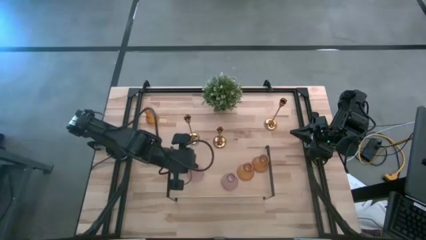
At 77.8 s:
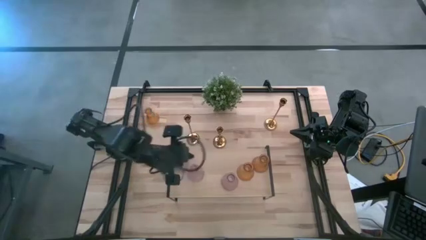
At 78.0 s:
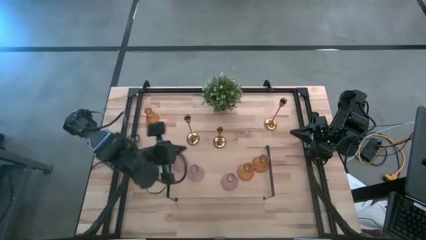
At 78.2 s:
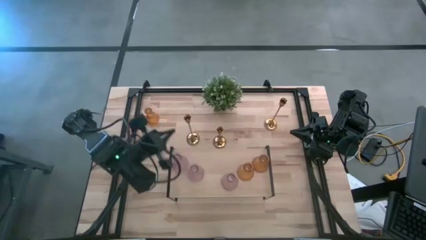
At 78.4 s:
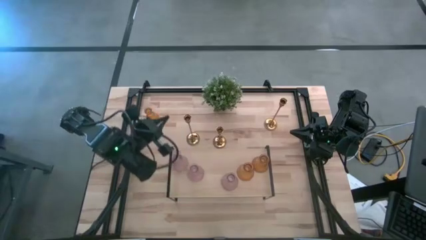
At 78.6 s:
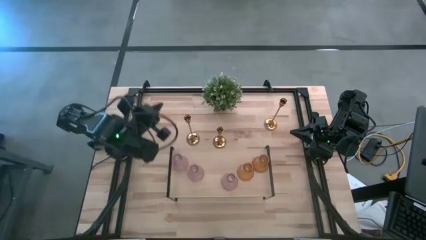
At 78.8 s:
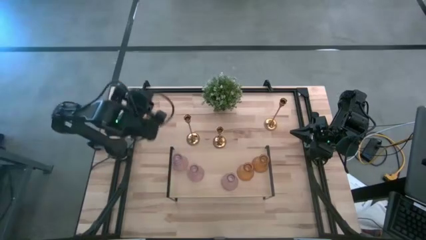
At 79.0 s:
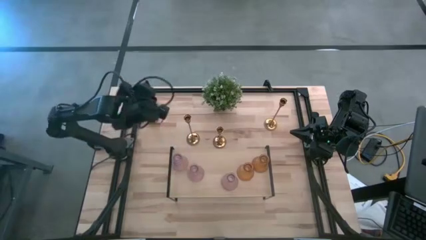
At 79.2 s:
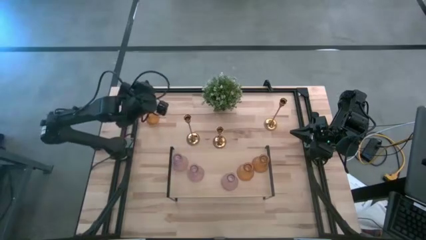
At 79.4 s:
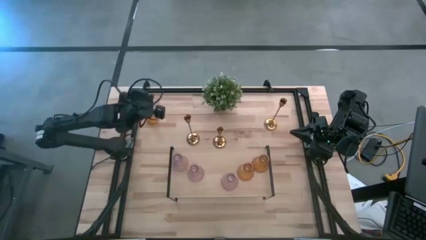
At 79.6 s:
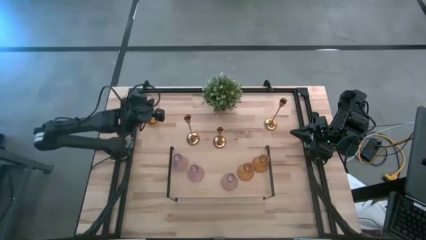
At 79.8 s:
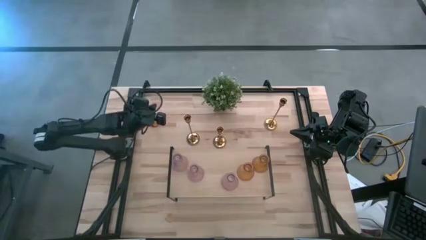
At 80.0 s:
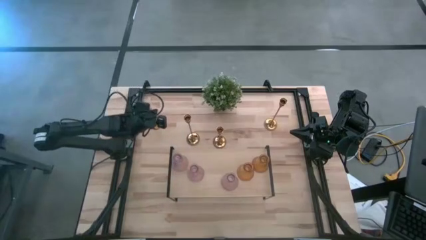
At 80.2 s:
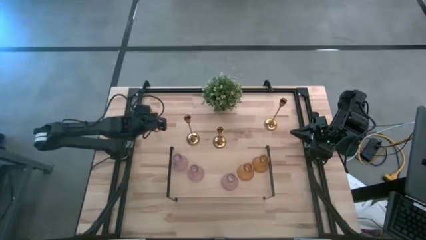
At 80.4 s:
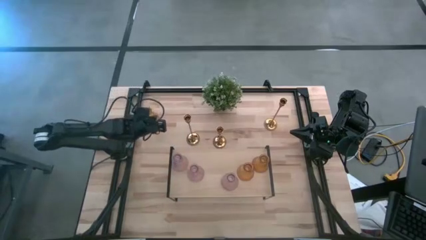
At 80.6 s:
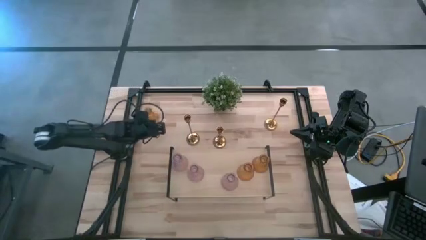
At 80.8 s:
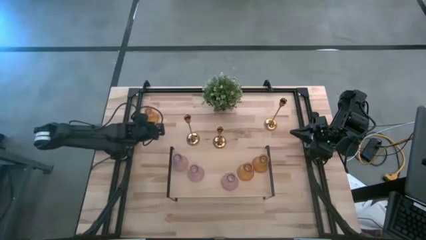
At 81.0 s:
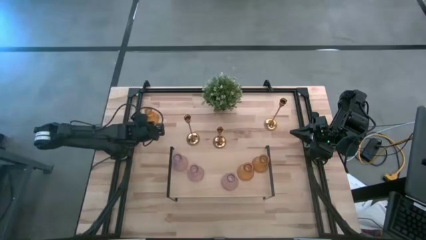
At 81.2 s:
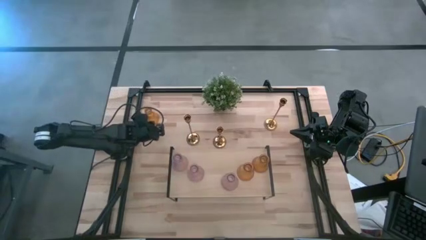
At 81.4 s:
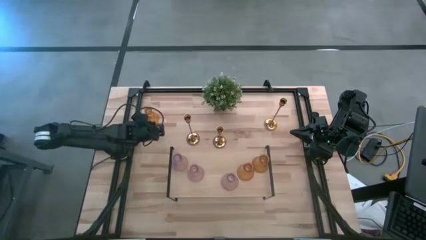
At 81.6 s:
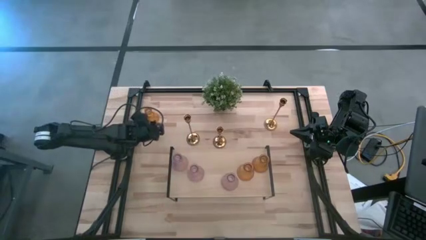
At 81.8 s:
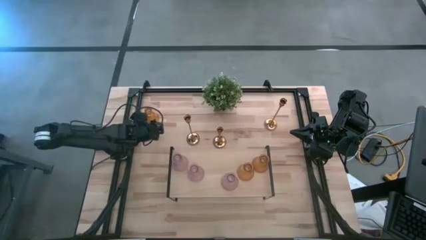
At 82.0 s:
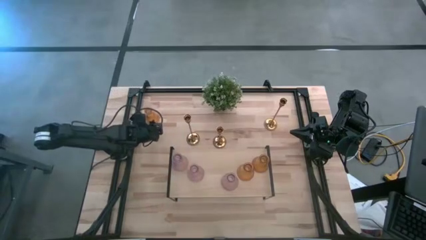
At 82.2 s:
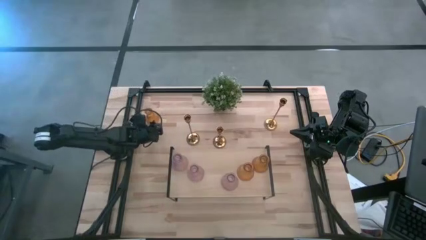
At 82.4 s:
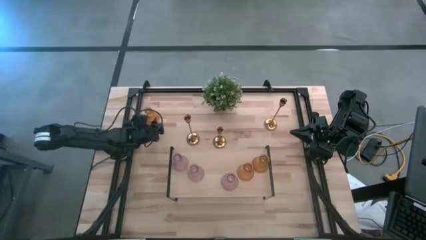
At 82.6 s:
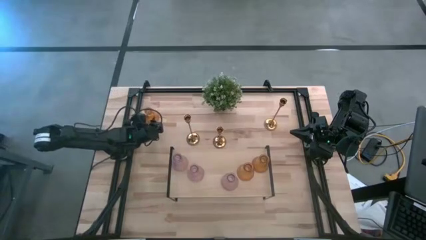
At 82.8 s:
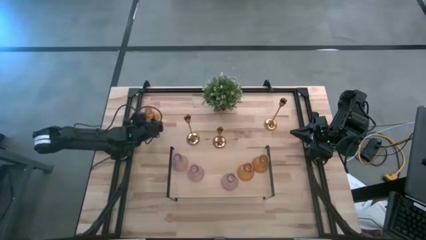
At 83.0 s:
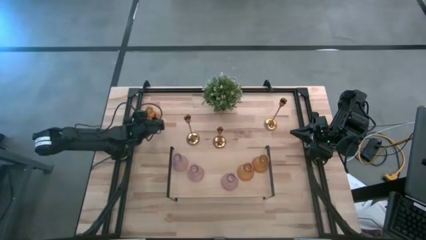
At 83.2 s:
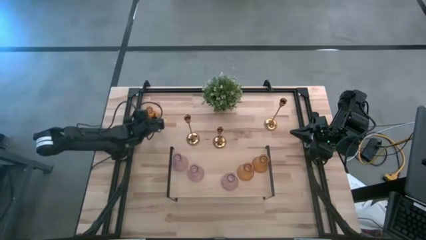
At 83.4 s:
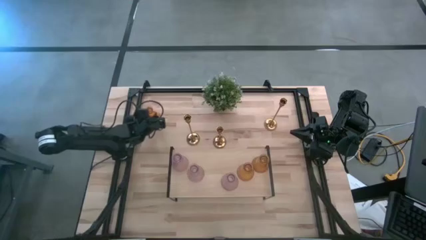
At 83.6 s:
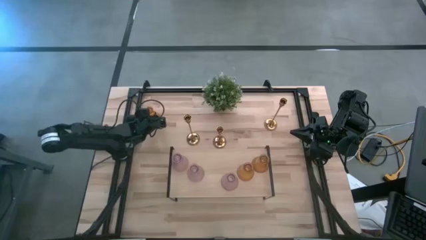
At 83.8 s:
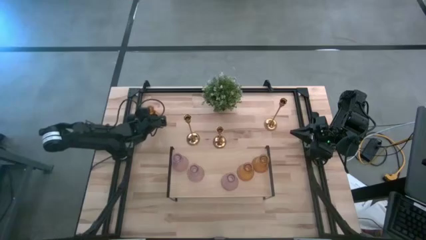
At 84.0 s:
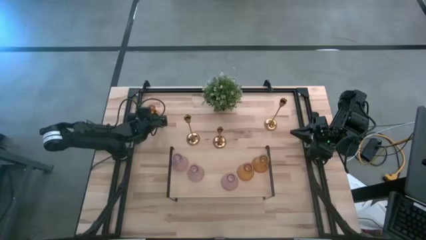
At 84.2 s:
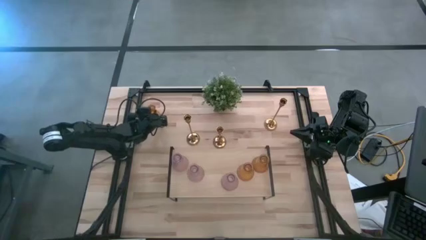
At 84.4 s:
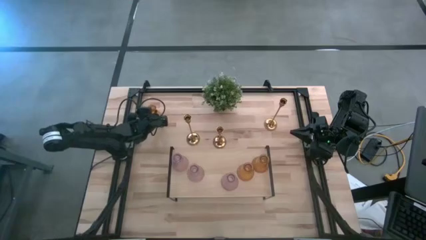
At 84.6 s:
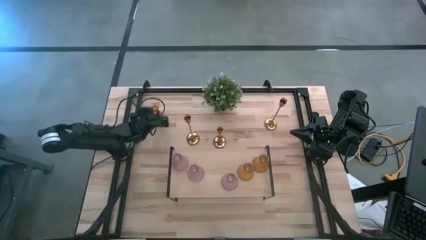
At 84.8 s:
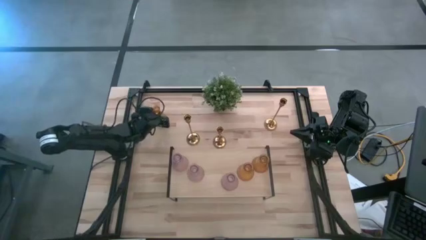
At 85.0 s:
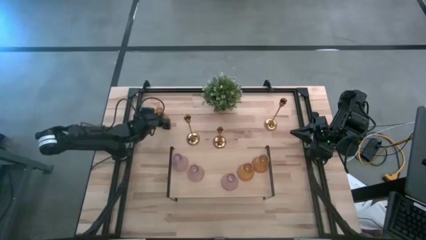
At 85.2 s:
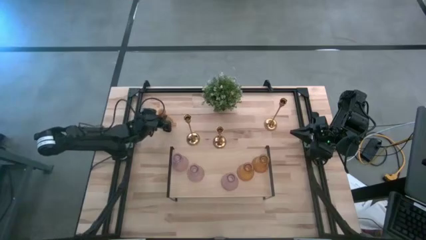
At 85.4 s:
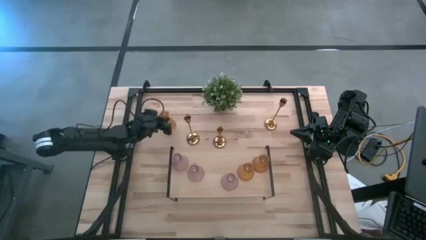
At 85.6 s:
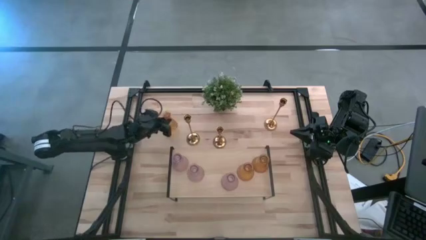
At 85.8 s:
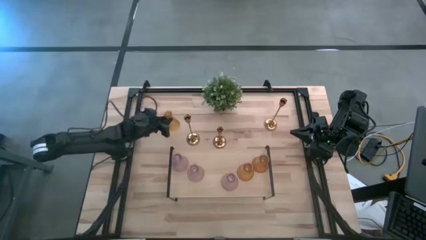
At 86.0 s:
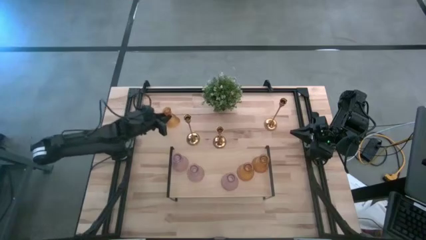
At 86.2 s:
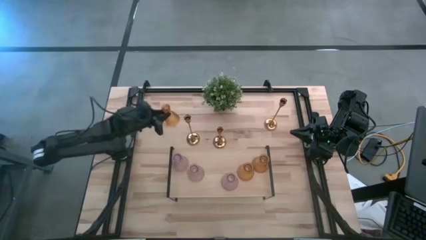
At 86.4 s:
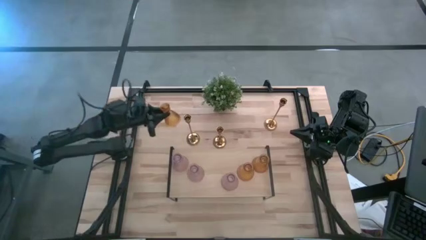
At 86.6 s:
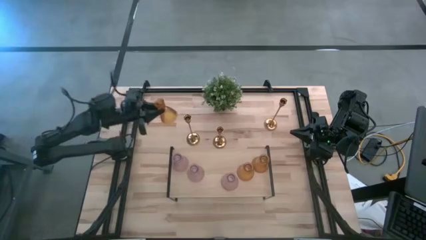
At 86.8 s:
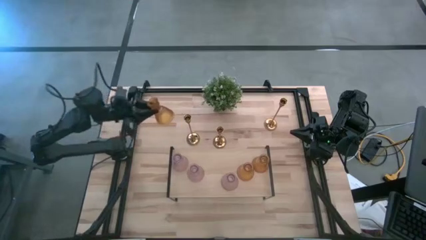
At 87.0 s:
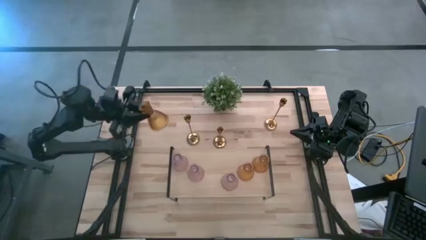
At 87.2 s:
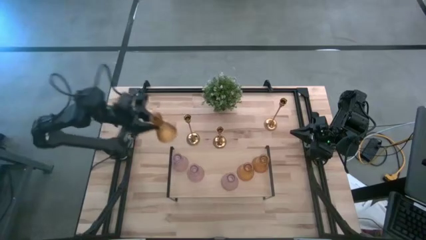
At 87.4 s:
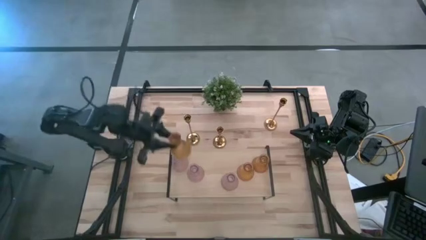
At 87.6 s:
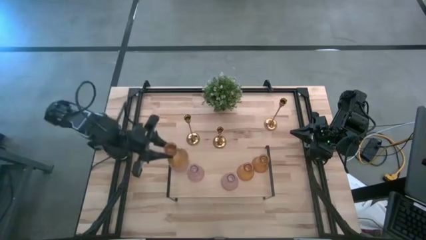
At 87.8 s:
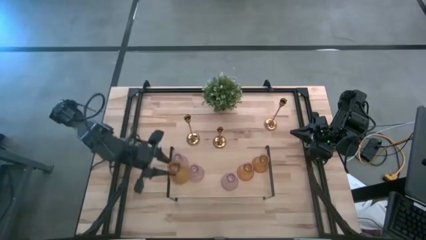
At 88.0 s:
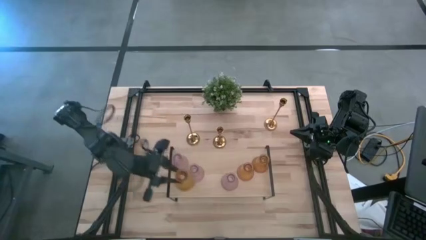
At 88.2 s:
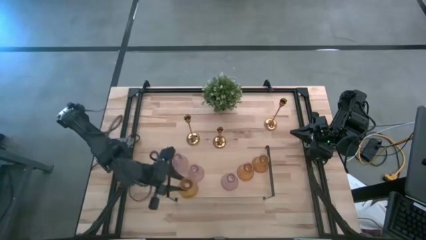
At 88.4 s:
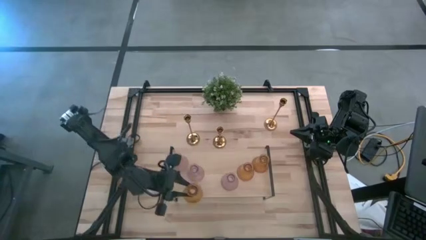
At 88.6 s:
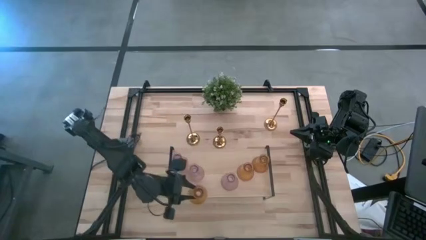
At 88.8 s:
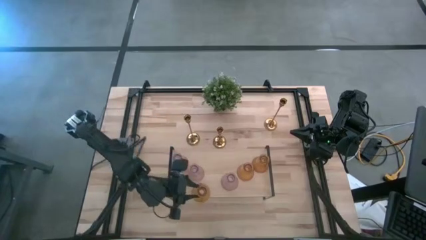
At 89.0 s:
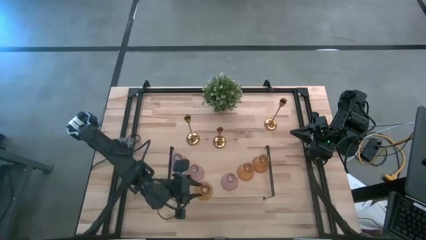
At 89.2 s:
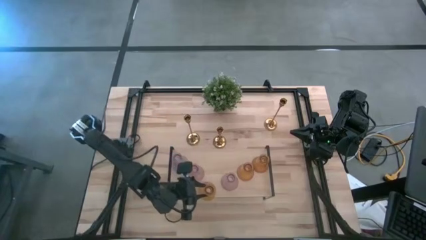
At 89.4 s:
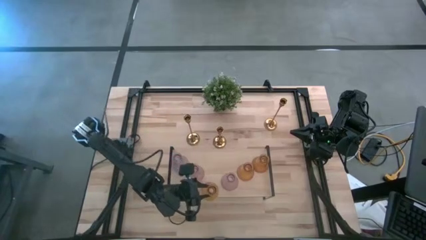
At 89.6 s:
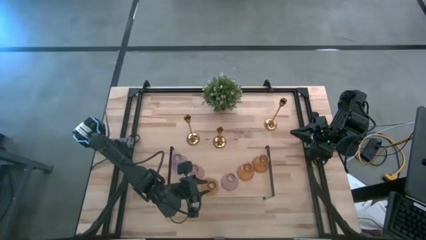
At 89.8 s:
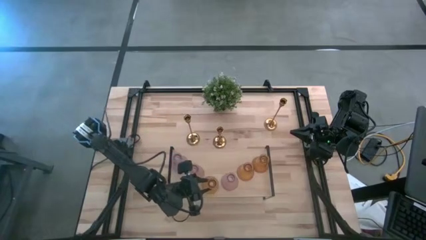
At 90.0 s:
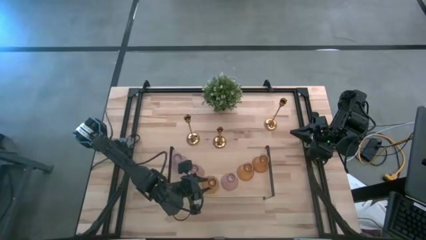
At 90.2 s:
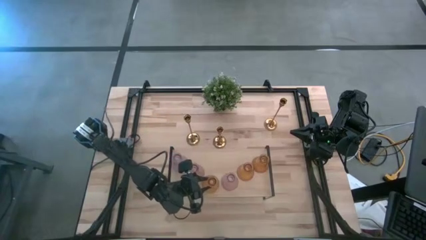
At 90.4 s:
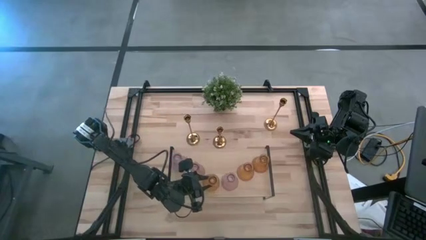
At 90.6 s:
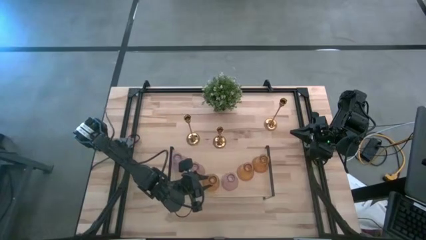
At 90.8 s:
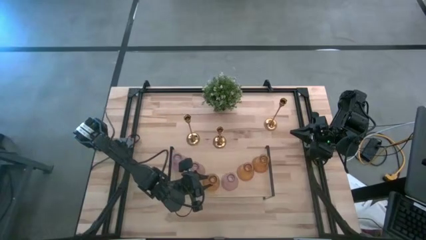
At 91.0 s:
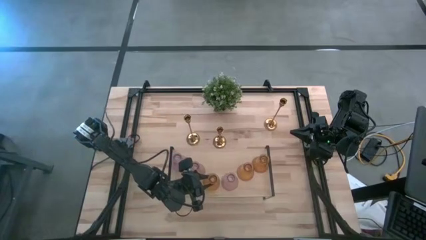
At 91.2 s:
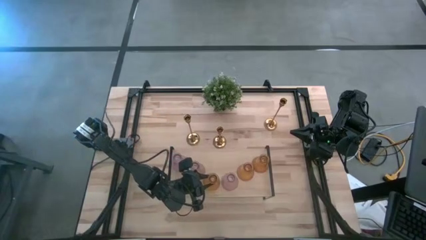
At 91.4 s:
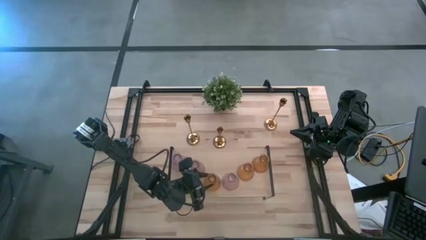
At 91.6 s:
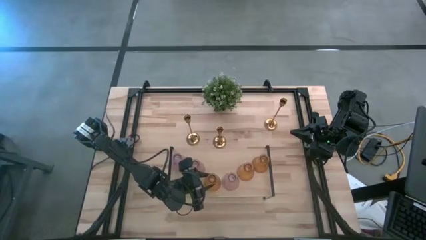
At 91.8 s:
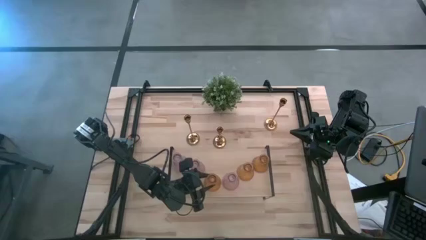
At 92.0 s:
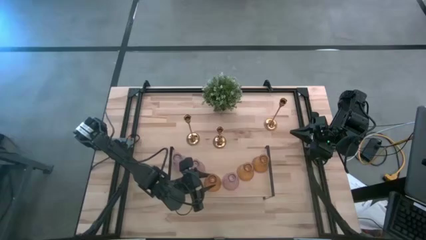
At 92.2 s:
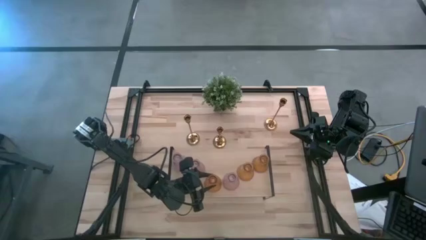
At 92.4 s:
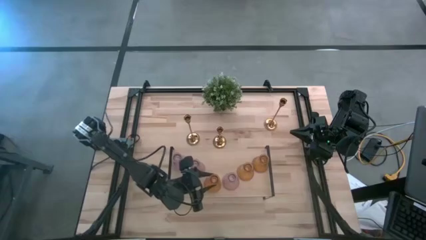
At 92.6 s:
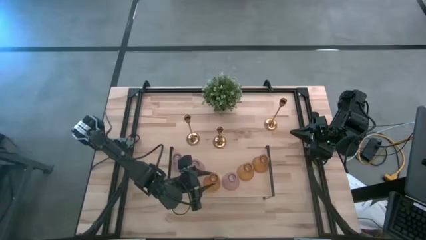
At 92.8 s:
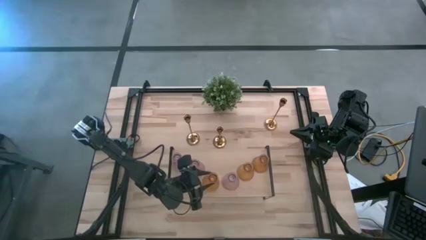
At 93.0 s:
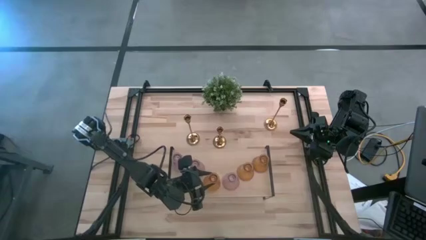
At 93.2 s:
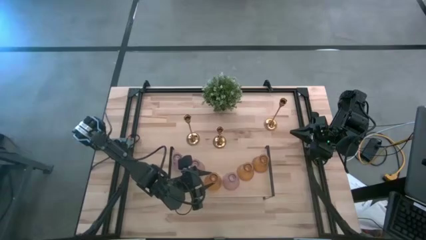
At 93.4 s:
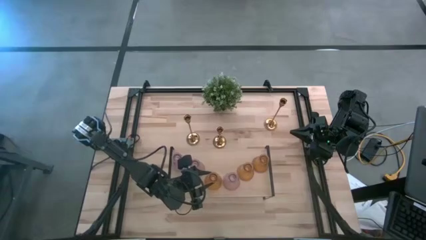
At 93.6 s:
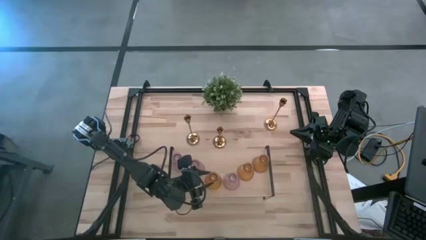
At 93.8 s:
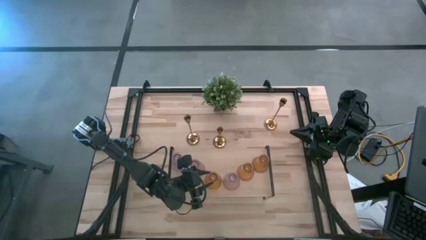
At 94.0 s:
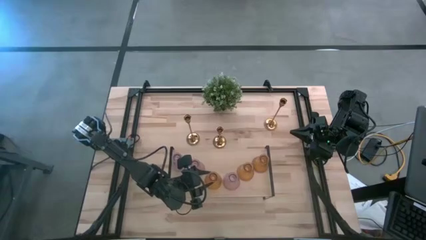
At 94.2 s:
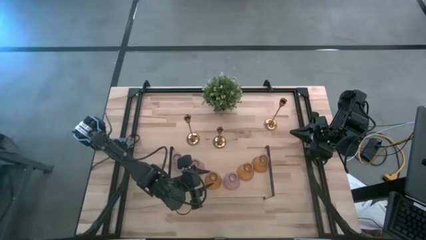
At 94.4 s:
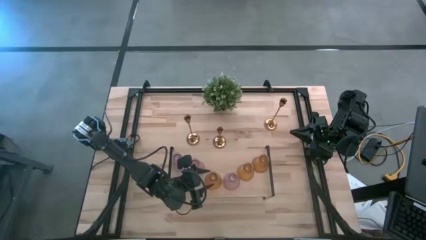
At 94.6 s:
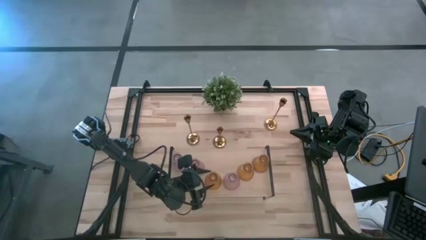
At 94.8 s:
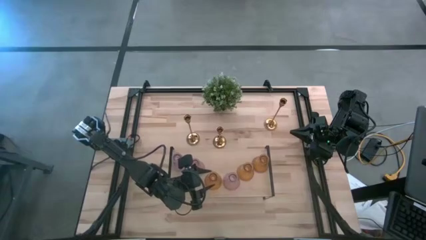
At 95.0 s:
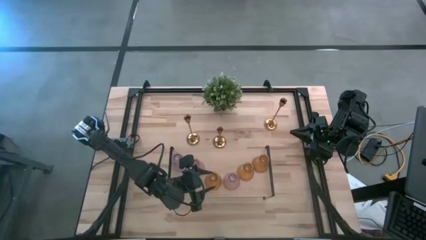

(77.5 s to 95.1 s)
Task: Pick & Place candle stick holders
Put the yellow candle holder on the shelf
